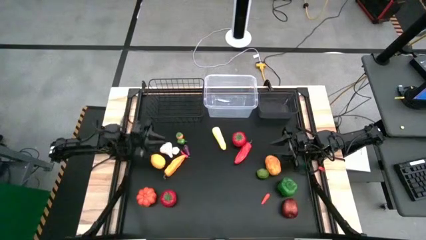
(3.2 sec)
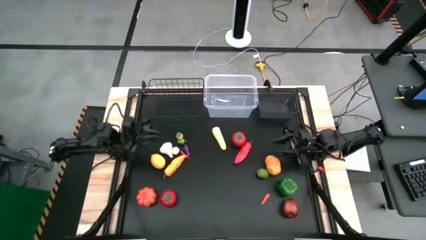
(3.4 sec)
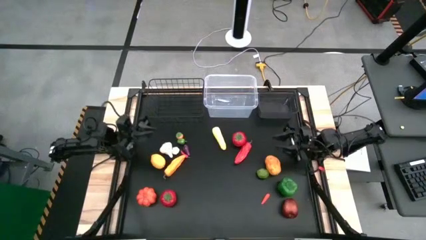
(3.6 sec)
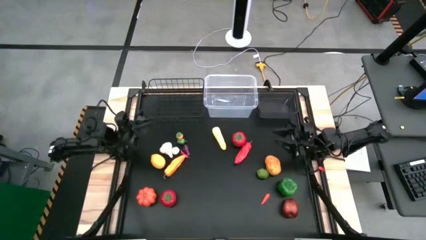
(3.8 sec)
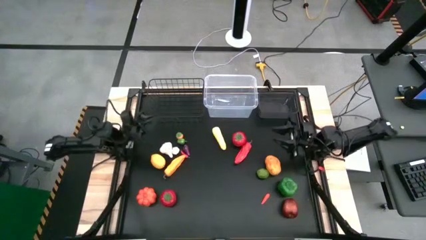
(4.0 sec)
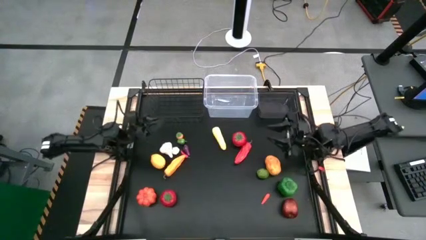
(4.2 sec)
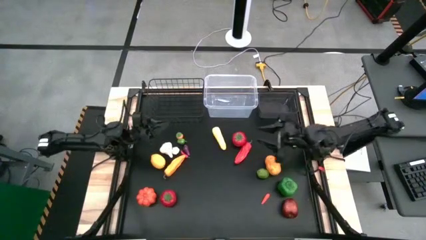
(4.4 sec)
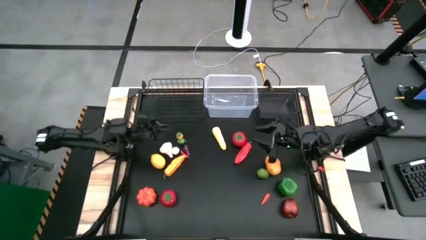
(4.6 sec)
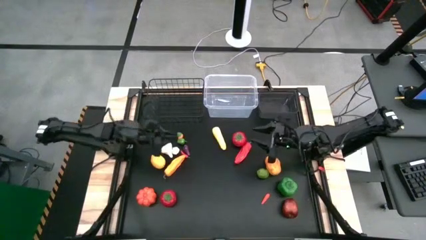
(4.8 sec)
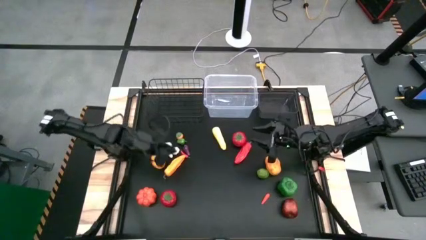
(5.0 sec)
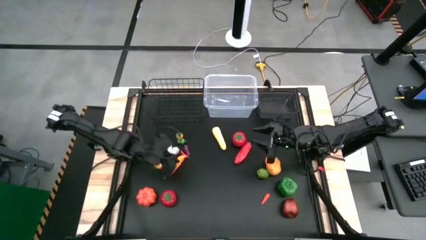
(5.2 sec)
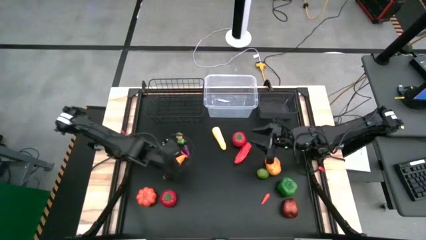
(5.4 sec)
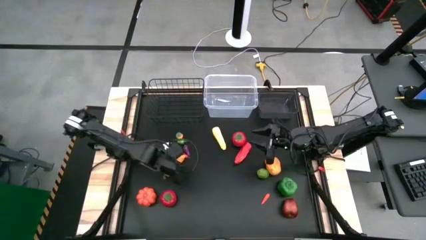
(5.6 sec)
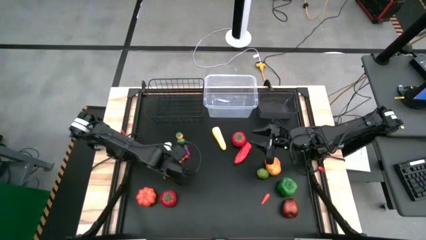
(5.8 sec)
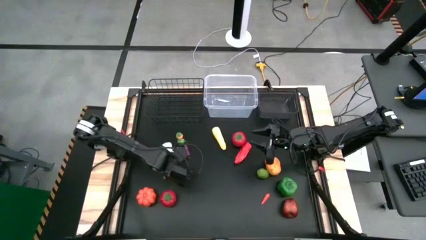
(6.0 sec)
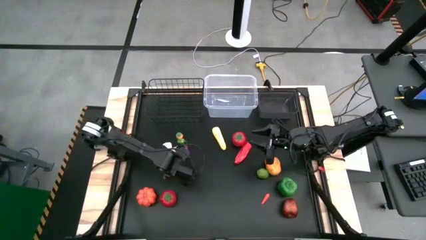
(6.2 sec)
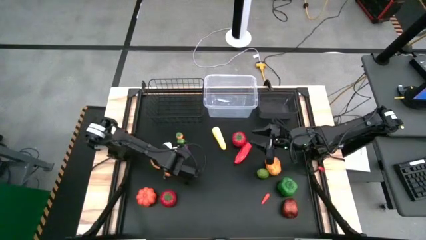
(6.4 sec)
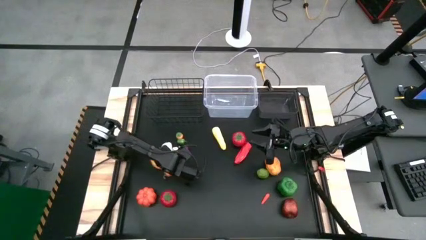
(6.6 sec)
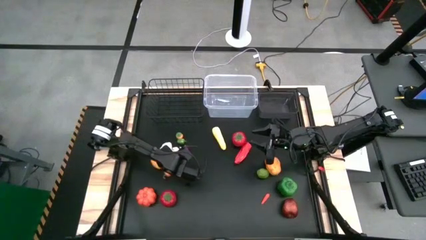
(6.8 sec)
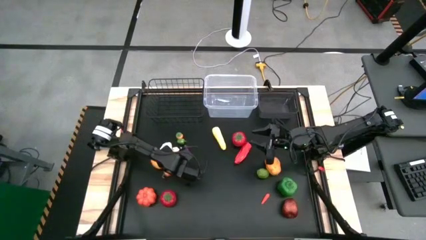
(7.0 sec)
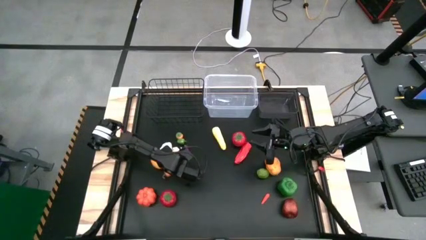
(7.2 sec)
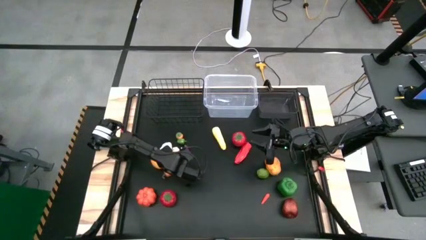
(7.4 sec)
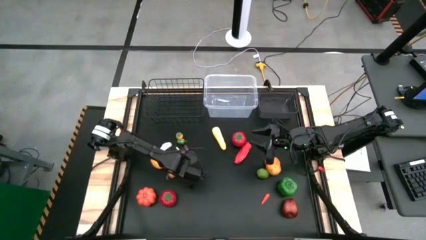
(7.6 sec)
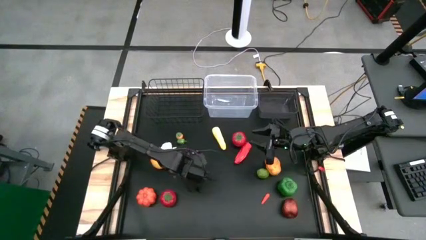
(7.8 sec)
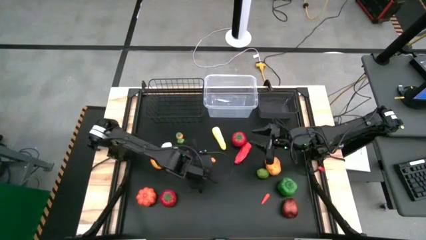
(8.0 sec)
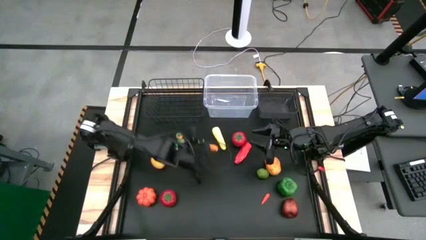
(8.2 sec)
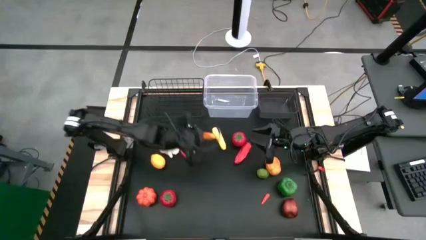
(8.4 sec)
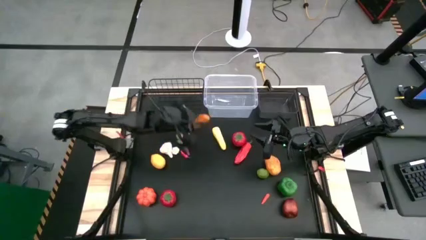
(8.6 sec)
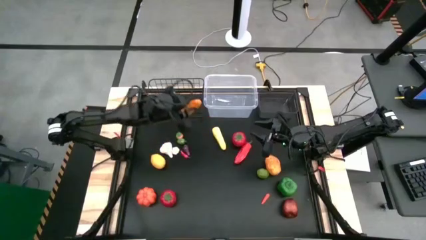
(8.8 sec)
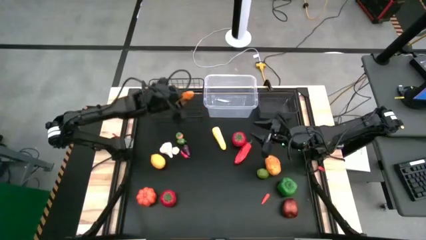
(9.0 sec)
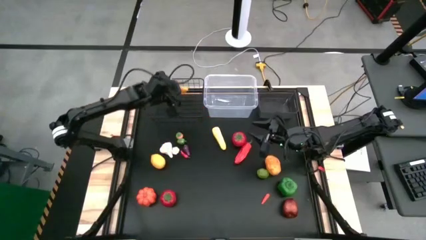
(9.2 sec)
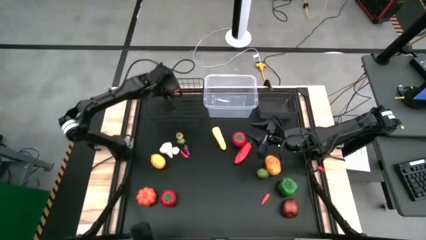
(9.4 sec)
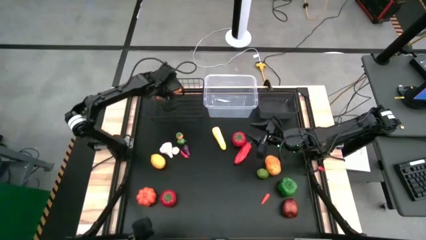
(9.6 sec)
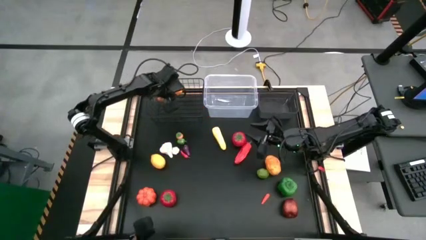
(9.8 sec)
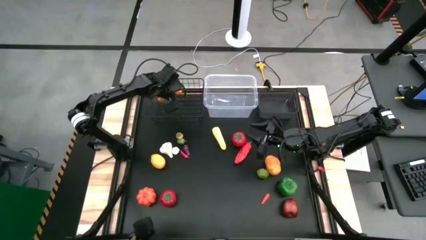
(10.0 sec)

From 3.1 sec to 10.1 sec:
Task: Sort produce into baskets
Put the large orange chili pepper into the wire basket

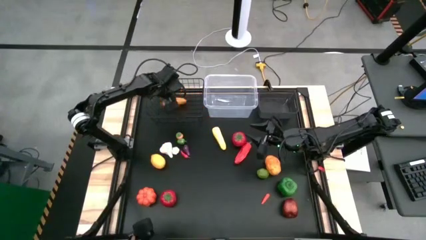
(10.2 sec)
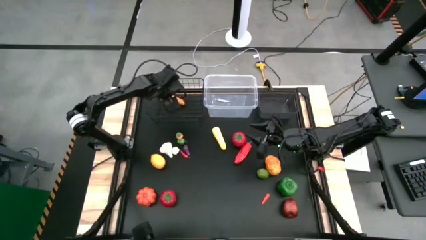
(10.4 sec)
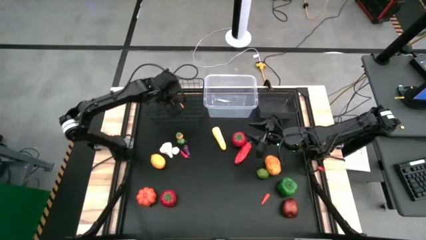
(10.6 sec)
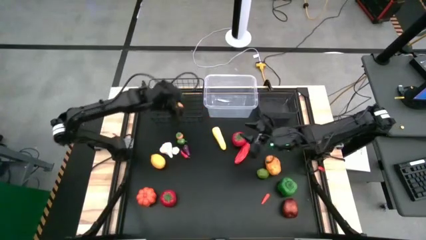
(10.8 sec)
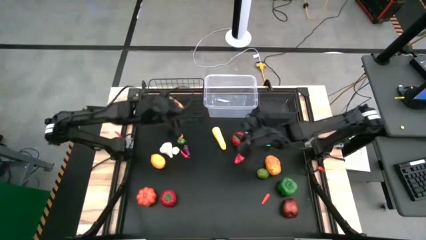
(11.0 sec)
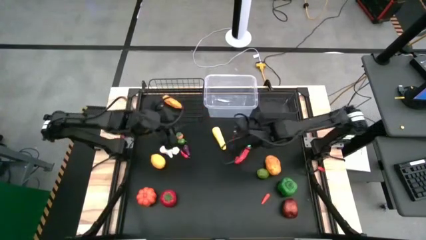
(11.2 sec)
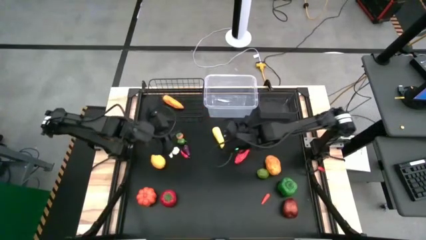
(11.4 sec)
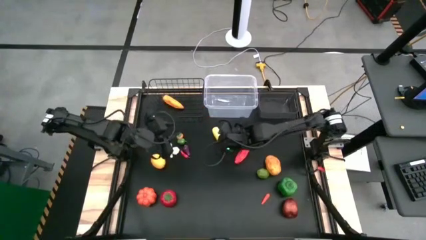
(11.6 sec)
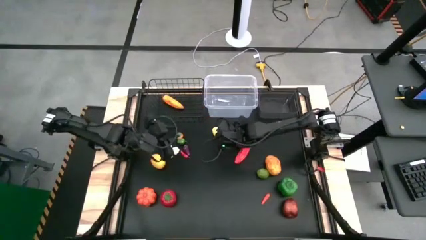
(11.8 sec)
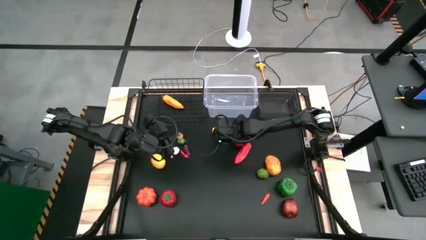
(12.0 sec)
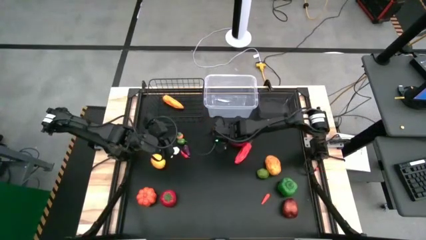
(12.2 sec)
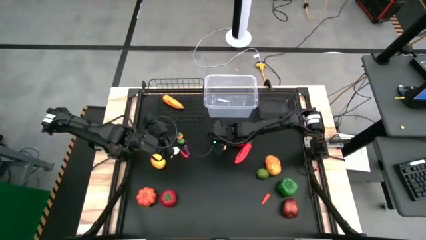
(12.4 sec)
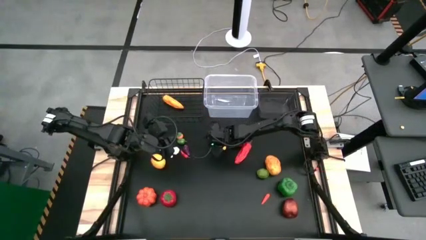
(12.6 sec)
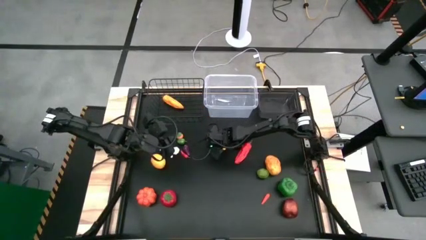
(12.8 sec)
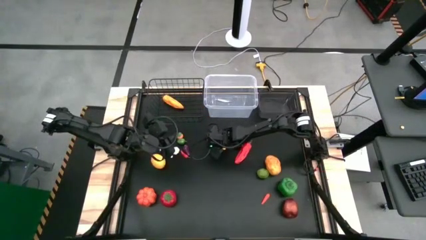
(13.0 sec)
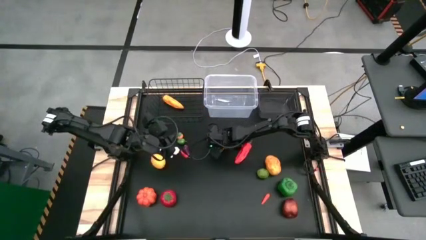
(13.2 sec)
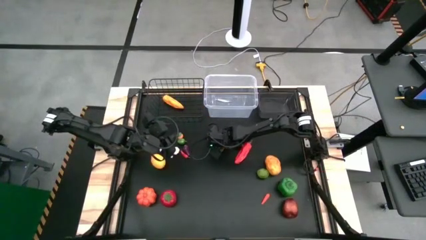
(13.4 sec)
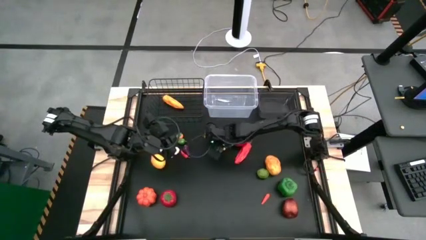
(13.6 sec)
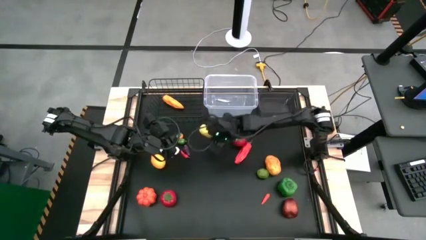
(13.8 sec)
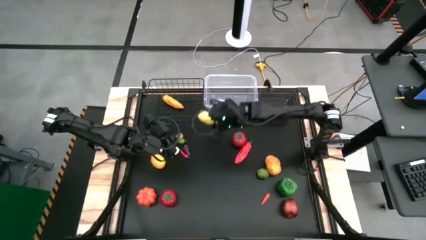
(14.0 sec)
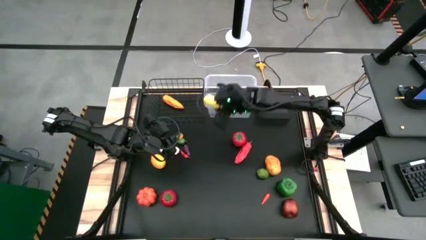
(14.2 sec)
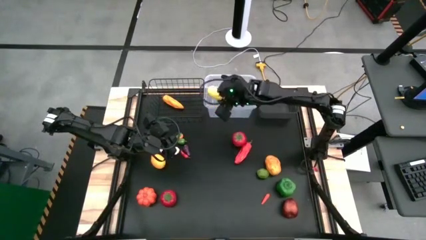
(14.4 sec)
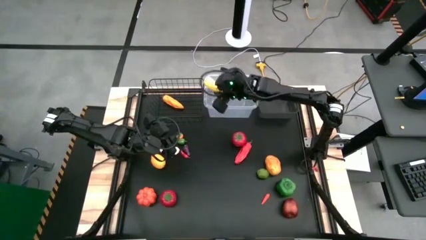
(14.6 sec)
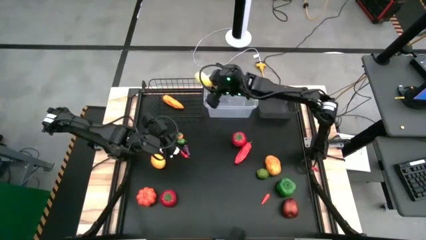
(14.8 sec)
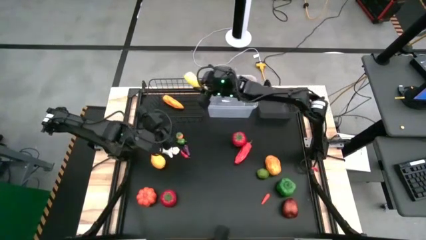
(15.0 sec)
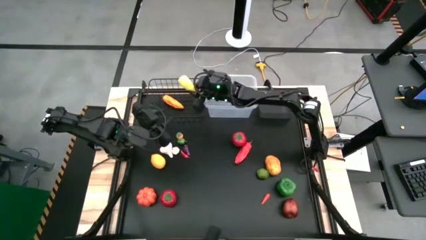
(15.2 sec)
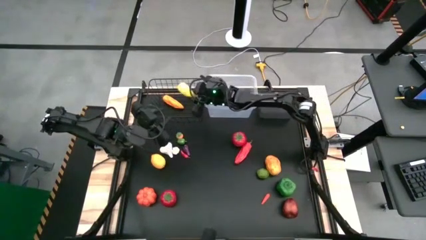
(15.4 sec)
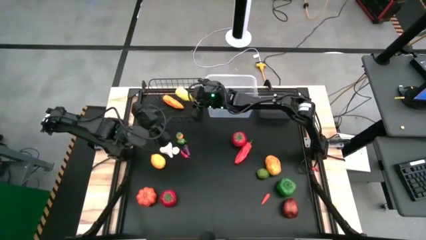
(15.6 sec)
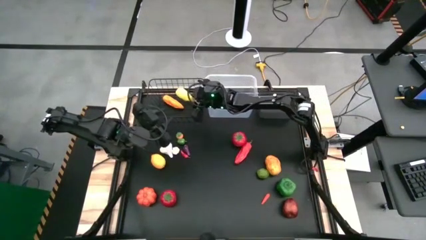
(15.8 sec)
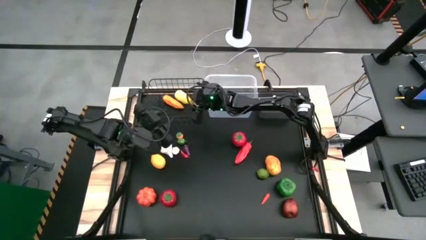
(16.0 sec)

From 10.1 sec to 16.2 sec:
Put the yellow corn into the wire basket

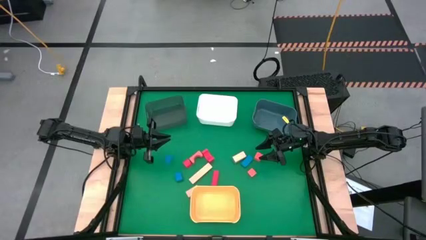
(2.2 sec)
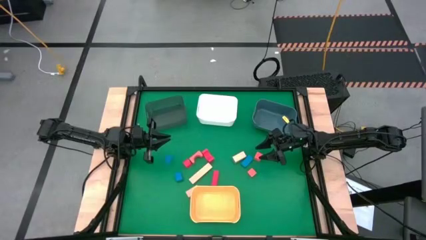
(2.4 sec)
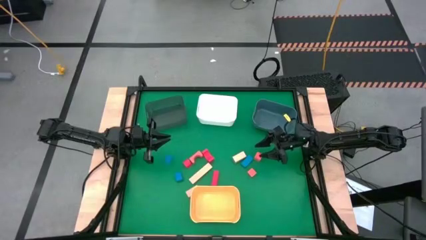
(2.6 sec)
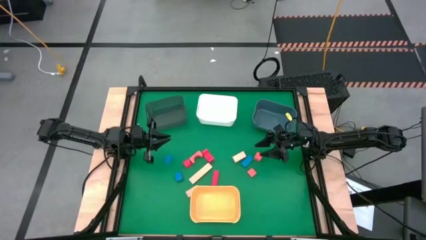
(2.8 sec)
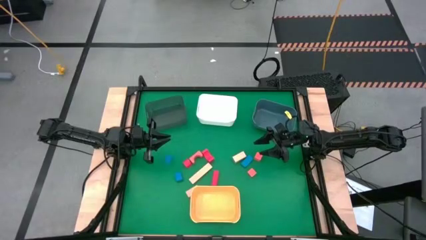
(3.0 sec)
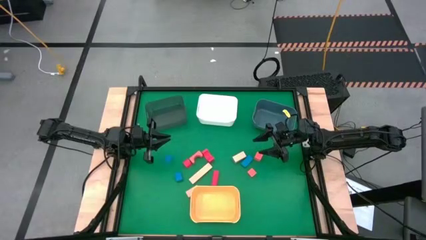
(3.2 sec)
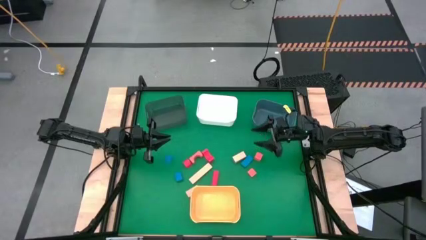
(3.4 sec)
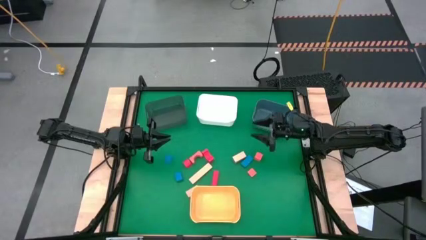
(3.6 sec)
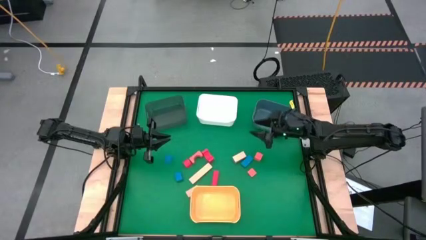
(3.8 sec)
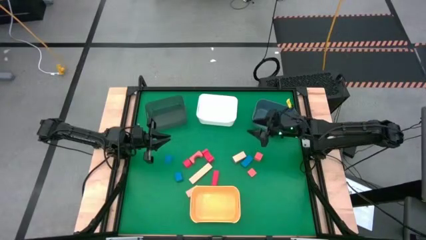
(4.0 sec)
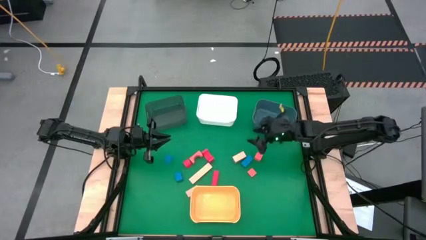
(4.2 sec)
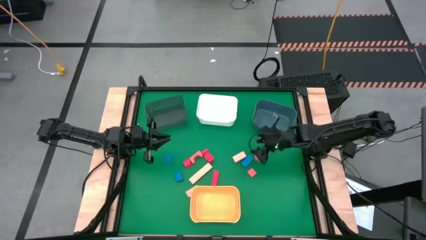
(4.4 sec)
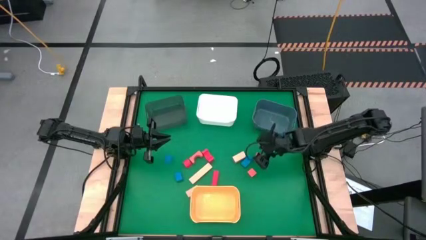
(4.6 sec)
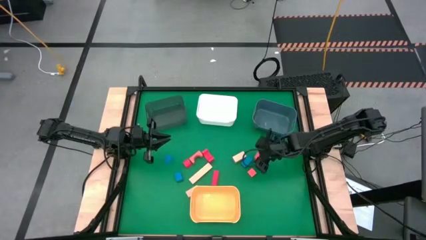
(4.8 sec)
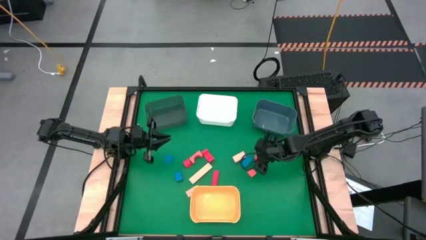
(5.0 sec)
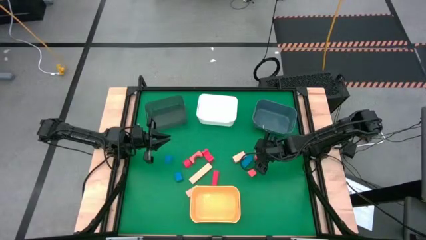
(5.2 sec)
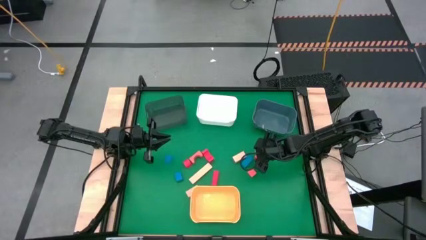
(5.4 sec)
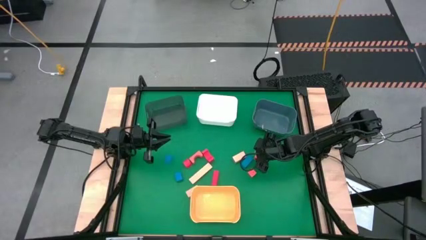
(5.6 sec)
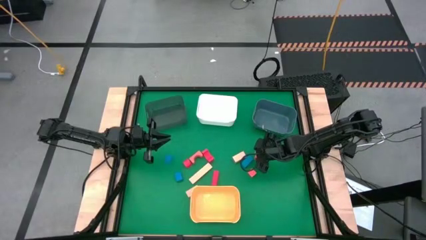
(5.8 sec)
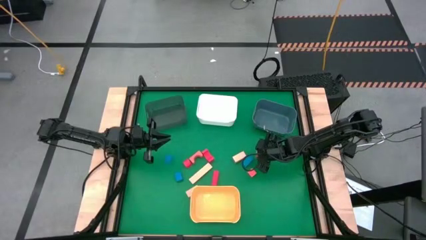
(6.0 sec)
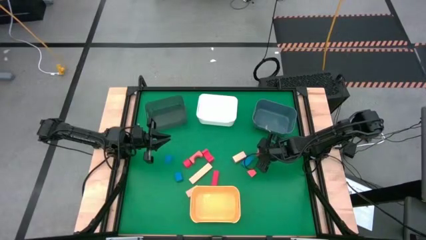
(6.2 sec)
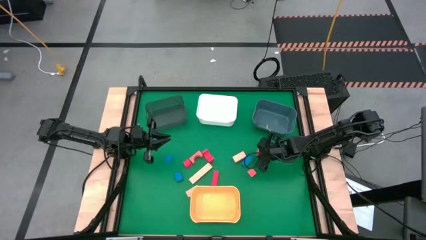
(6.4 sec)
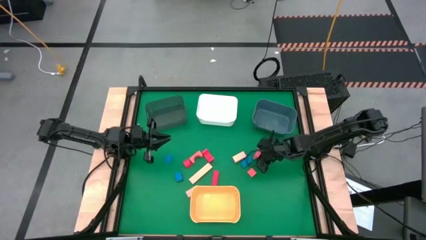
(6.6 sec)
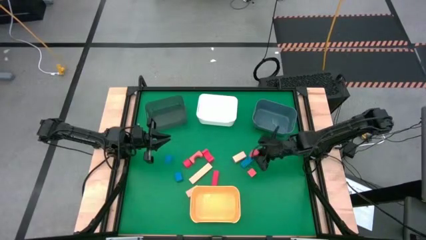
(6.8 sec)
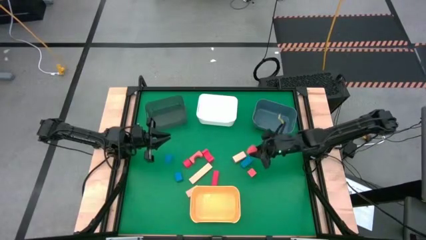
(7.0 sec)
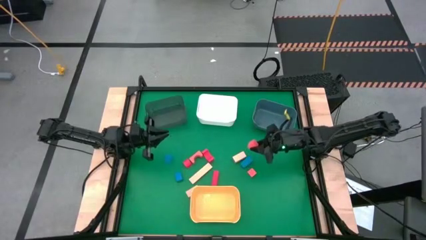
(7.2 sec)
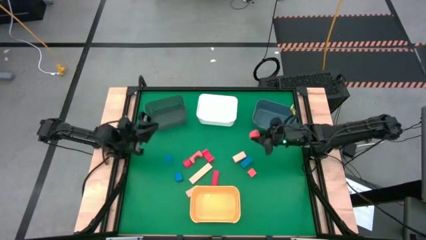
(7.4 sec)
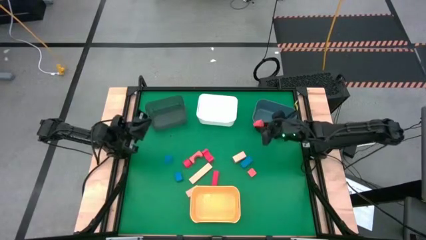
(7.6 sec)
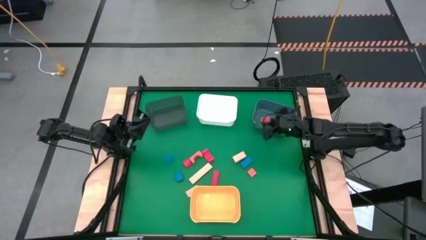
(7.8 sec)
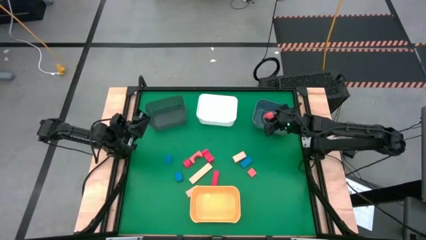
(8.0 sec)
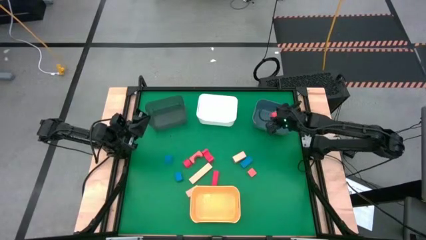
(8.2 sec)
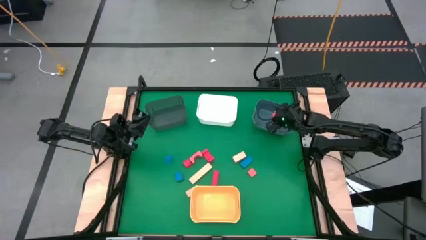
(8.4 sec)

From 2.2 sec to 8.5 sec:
Task: Sort & place blocks by color
Put the orange block into the blue bin
